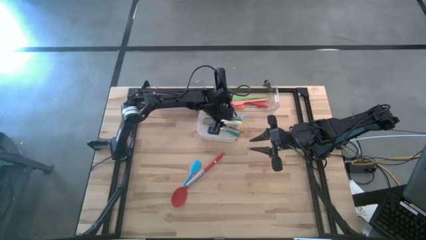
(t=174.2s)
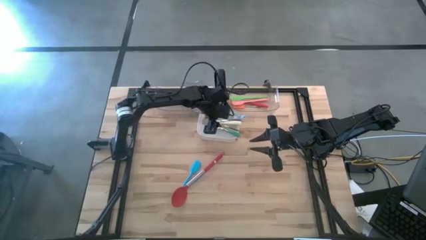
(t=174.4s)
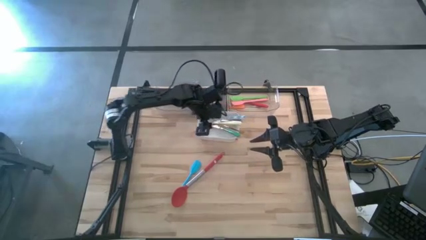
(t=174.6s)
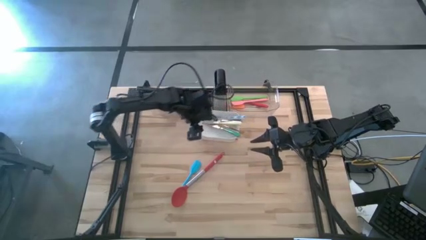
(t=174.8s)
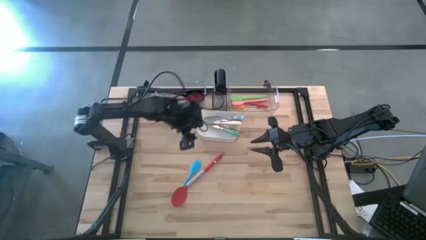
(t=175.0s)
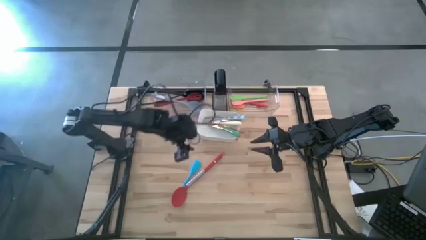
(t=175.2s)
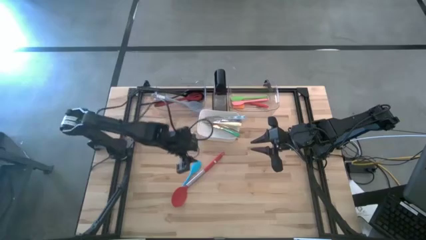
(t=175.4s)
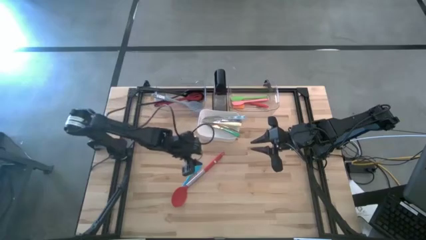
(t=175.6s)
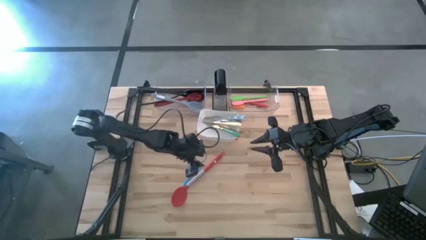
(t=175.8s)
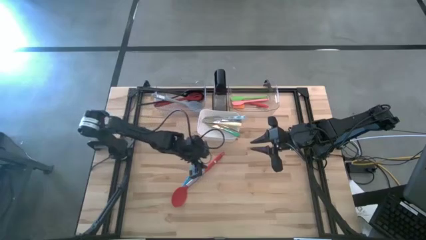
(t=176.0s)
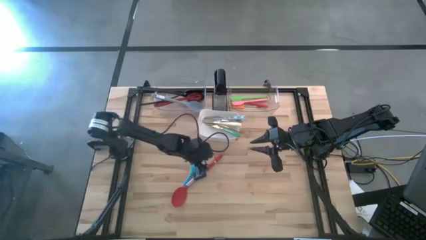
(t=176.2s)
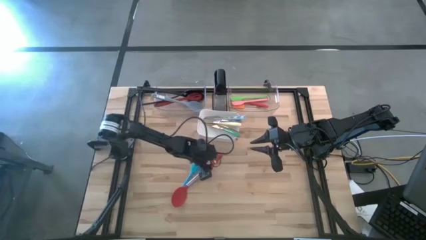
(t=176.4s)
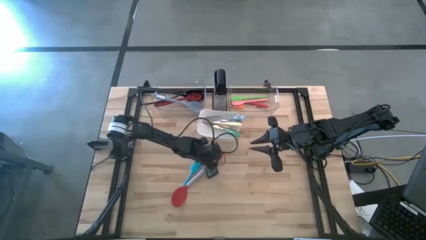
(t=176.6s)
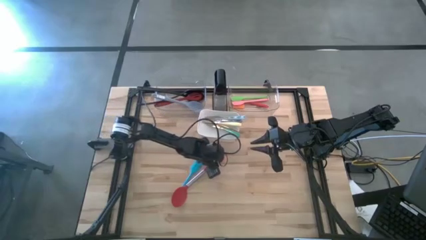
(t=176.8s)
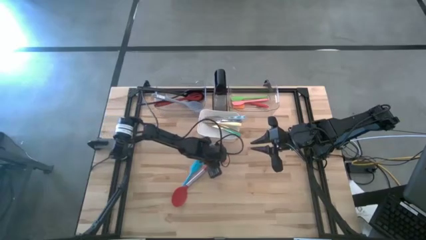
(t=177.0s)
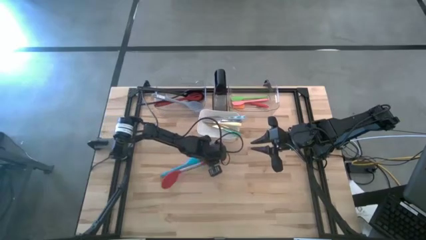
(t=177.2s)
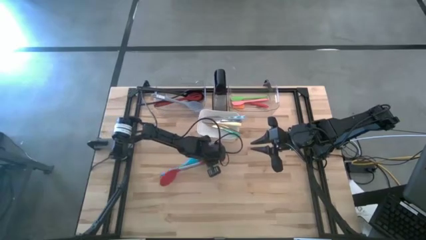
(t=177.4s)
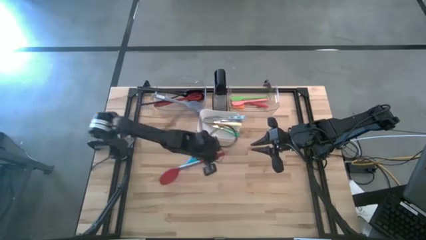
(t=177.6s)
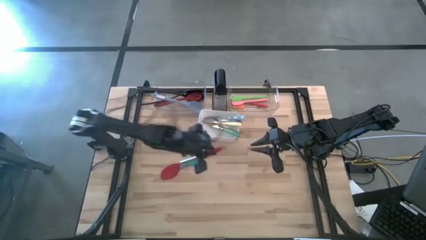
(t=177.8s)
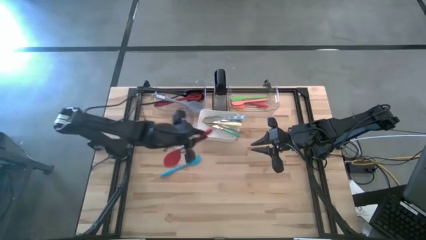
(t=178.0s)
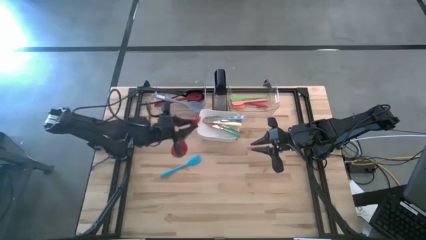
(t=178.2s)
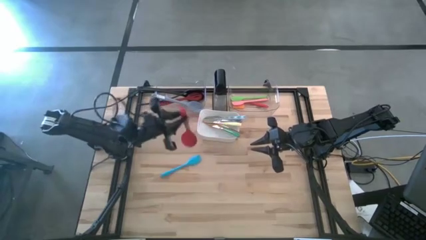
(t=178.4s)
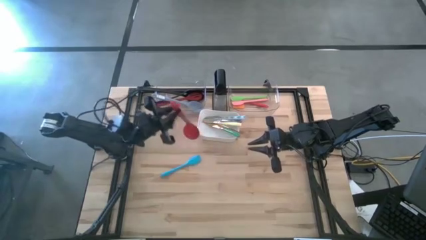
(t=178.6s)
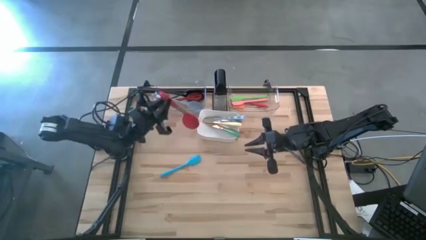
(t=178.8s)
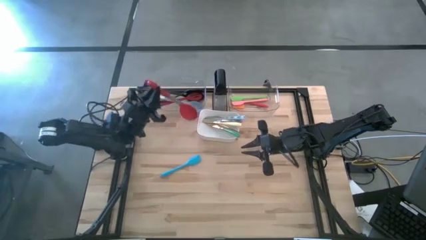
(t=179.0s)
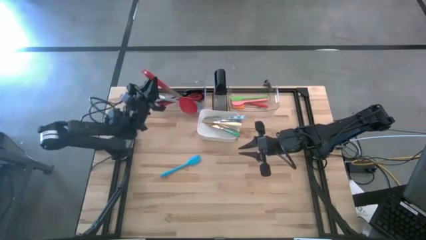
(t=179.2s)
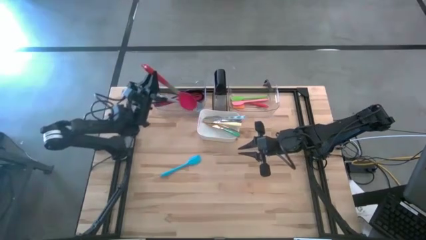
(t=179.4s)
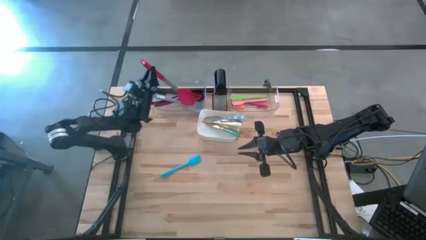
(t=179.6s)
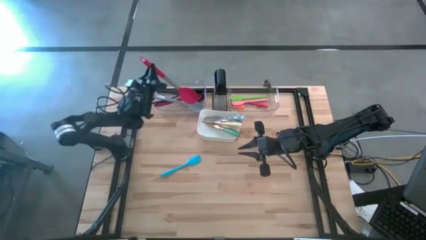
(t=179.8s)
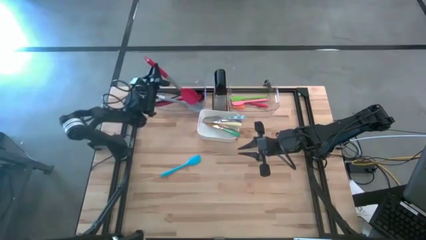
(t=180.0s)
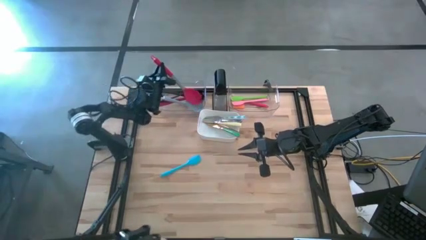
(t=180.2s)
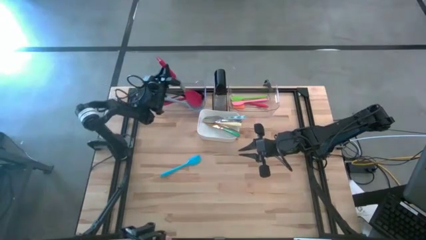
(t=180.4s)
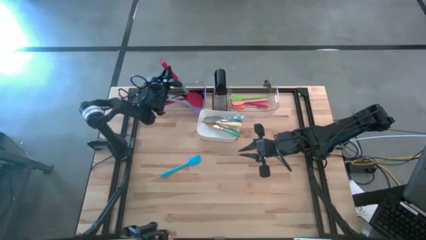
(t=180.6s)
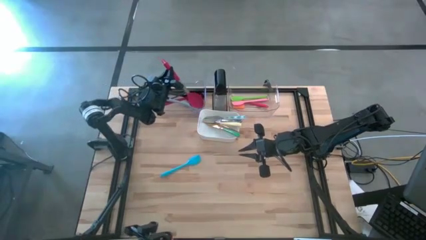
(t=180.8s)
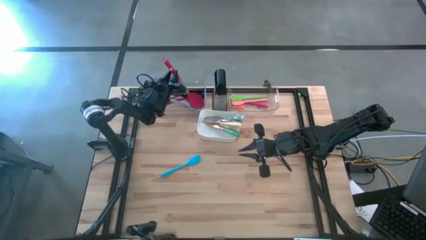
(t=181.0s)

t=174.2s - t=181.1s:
Task: Pick & Place Kitchen Items
Put the red serving spoon into the left transparent bin

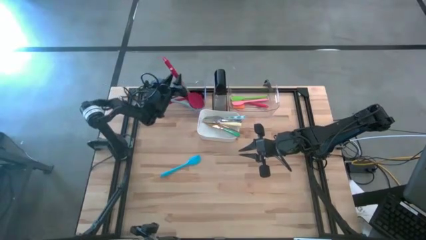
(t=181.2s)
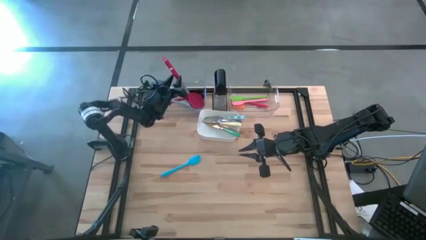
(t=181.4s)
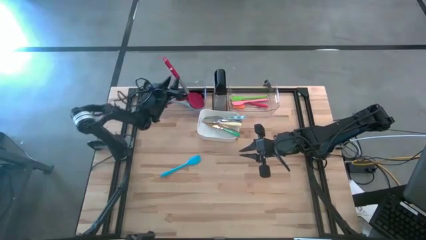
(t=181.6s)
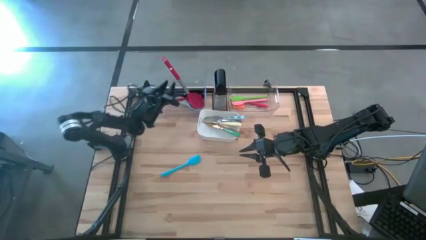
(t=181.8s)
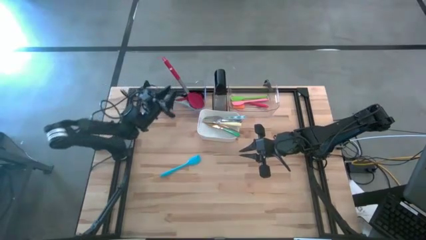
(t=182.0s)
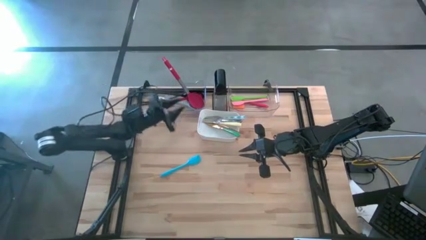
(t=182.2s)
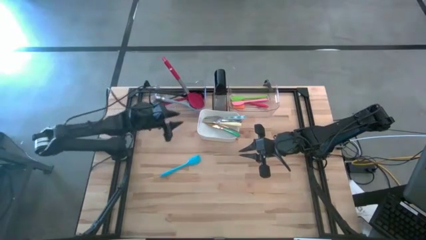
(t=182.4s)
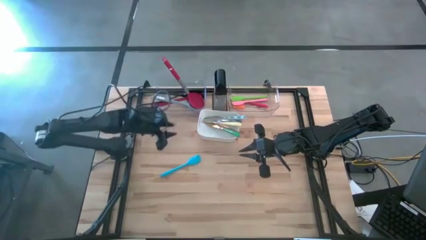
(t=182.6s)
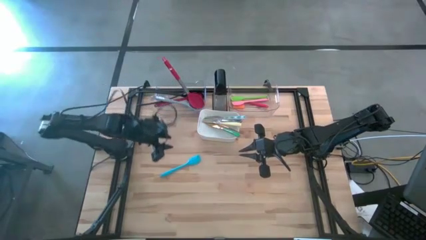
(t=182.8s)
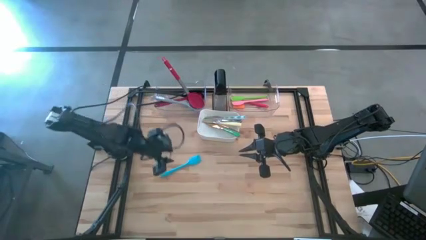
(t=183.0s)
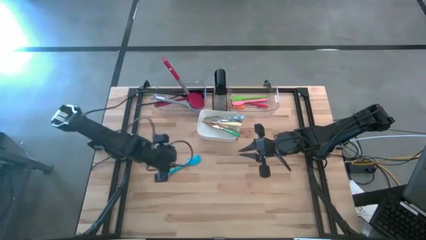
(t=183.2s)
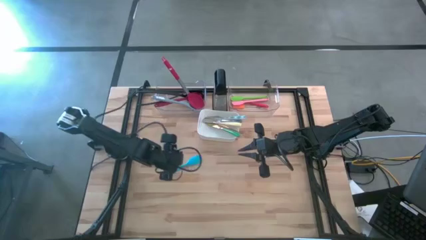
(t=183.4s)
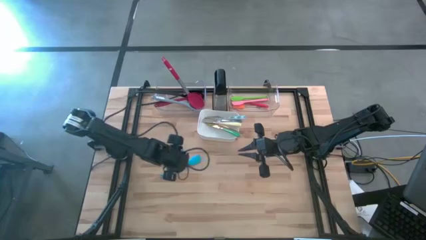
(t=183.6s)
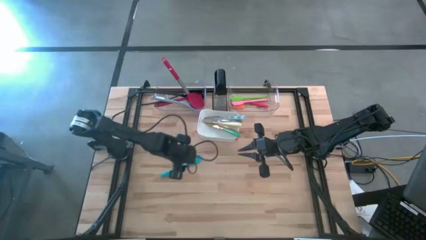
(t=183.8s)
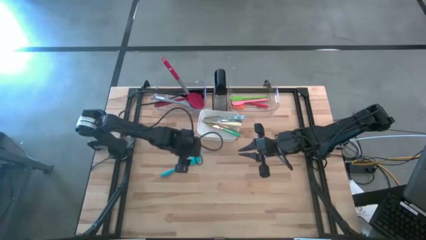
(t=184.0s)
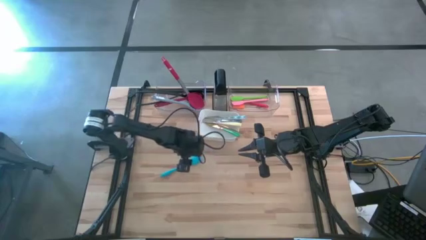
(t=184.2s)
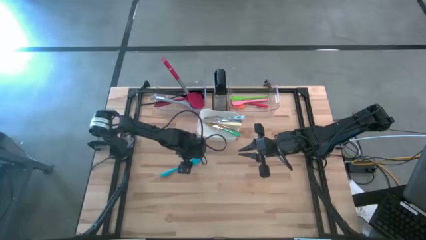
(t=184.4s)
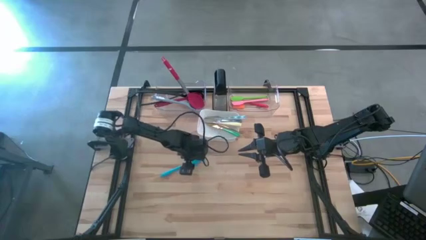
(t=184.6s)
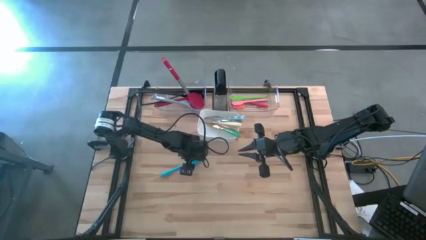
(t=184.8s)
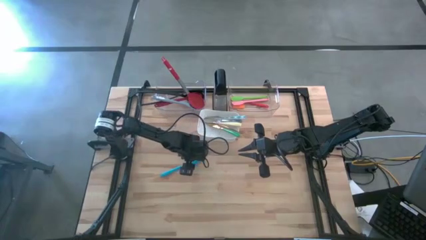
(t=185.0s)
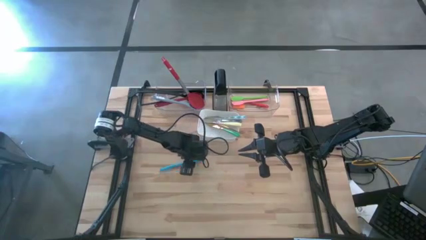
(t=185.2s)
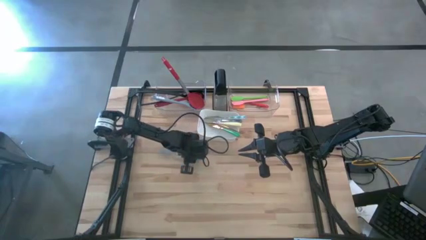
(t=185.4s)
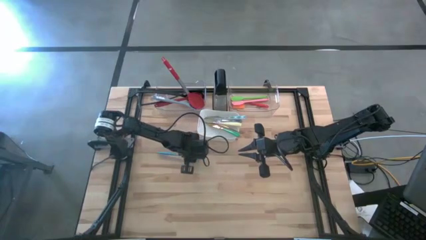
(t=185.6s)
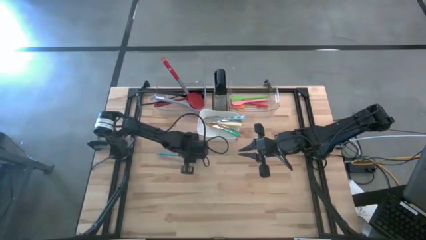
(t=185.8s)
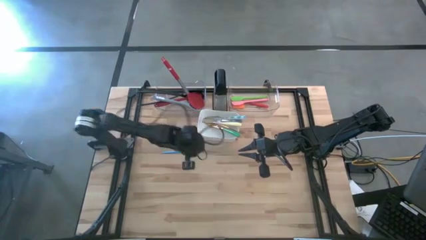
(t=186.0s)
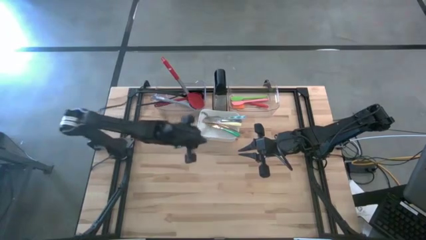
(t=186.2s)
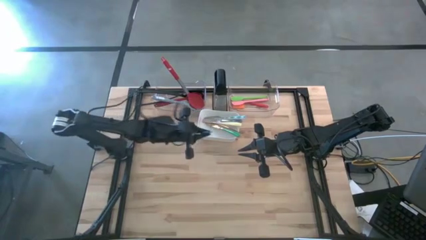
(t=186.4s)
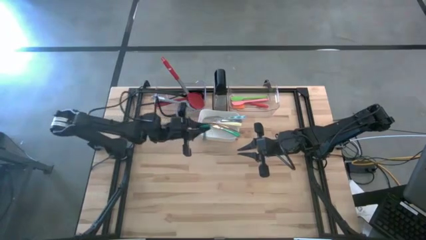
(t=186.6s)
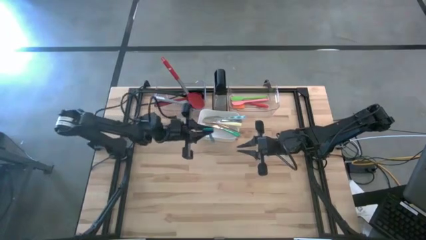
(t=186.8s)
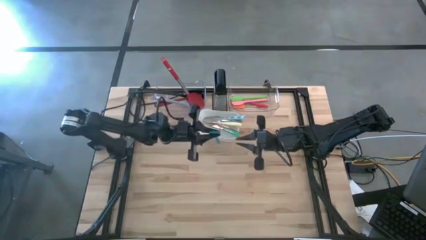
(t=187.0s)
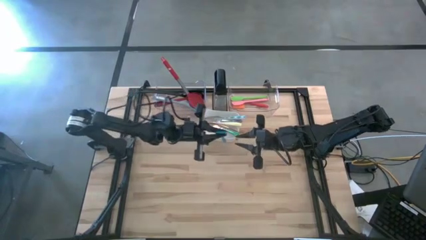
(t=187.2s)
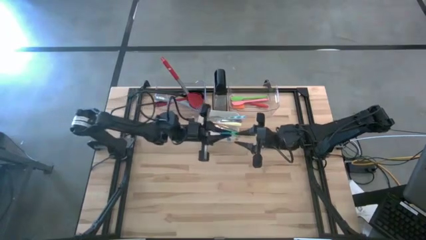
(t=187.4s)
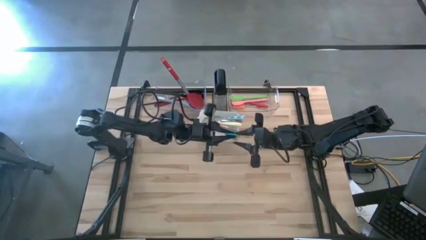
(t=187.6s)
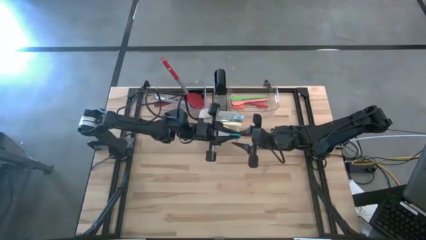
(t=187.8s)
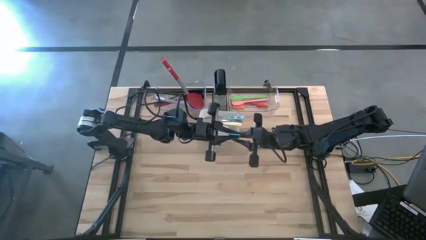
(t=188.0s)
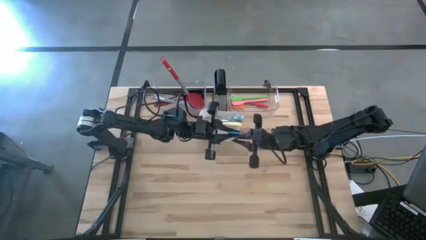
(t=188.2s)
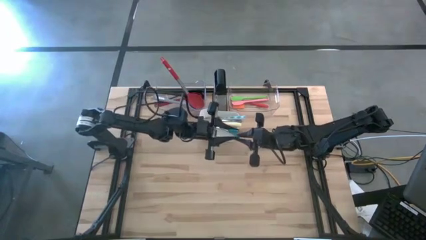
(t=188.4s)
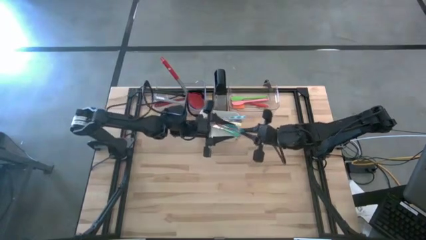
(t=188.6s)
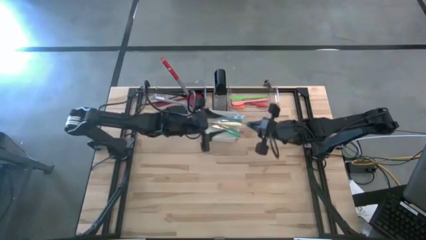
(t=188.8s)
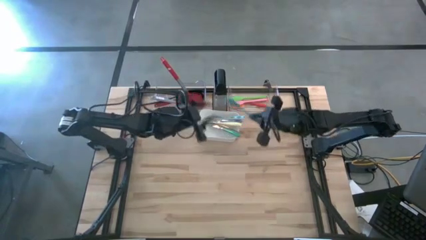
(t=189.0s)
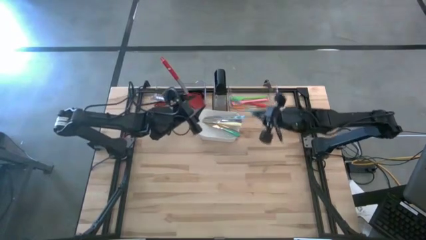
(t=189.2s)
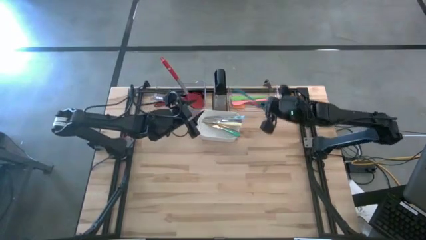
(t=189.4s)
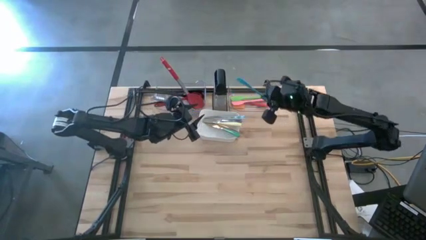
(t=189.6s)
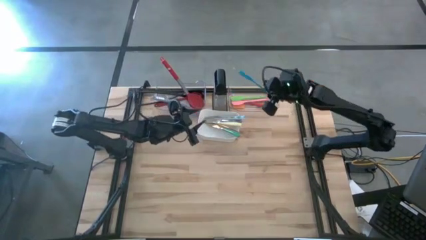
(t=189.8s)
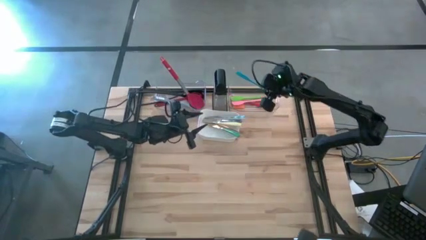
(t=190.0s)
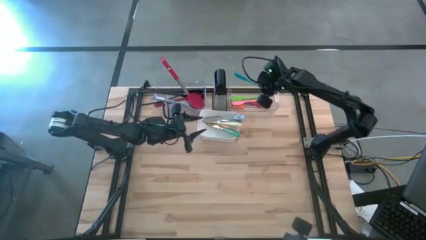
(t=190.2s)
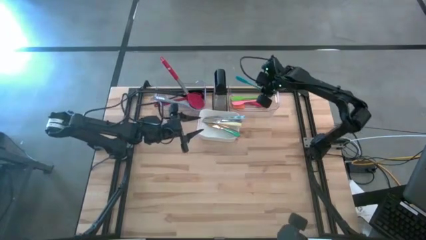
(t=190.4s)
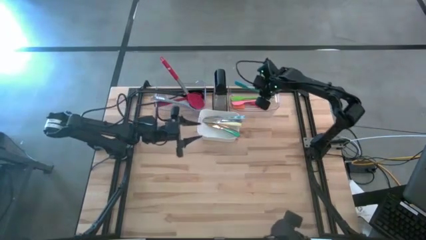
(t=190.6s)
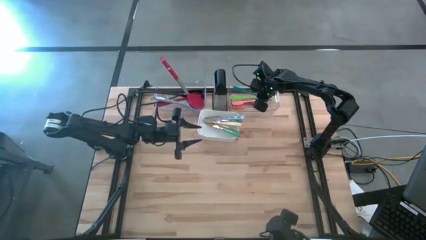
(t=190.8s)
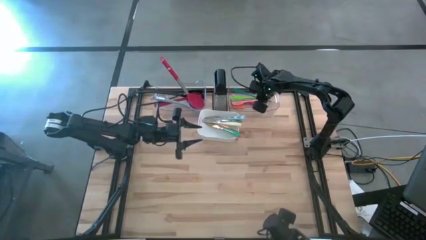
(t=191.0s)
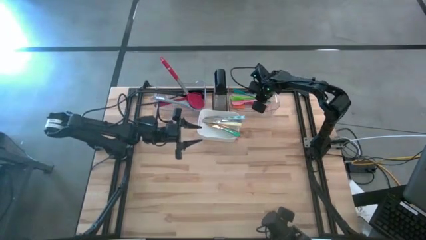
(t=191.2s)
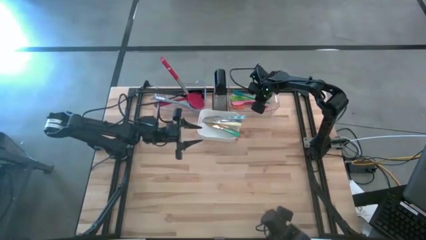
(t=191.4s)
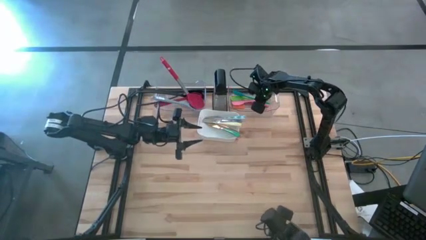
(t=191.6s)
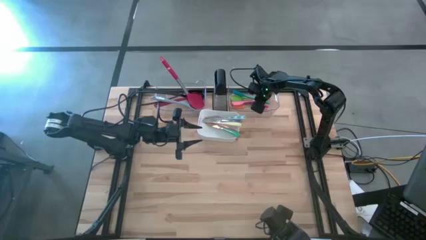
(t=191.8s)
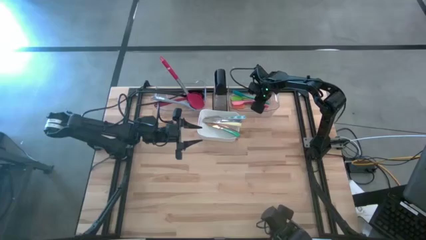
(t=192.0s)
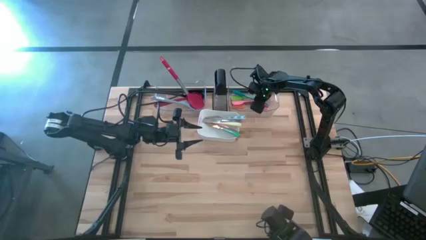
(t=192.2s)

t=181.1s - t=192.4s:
Put the blue spatula into the right transparent bin
